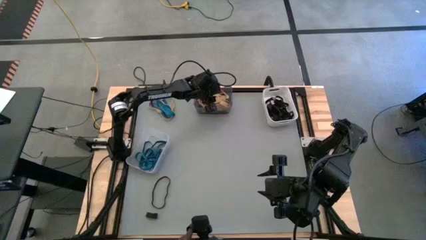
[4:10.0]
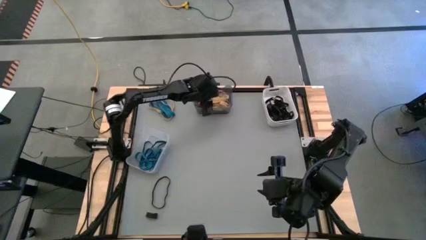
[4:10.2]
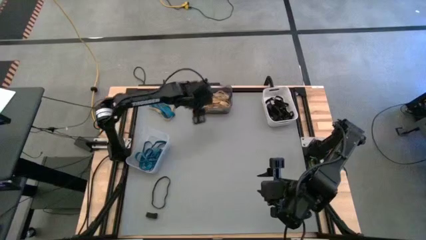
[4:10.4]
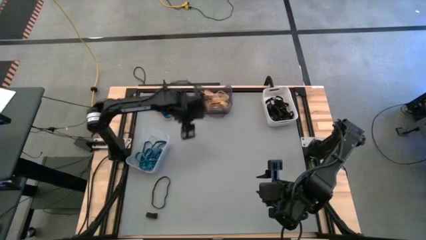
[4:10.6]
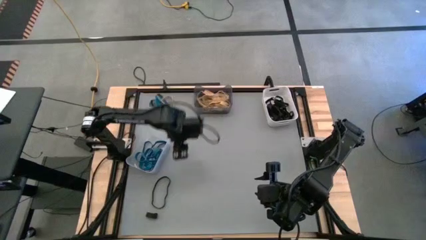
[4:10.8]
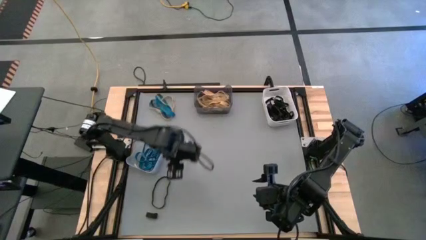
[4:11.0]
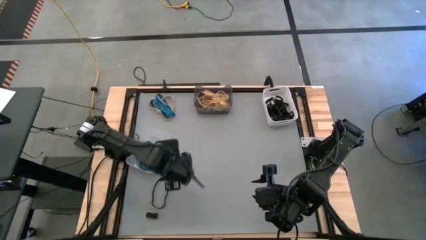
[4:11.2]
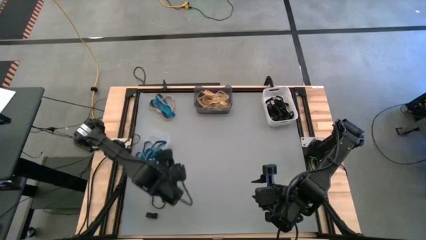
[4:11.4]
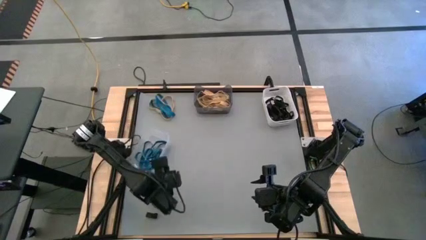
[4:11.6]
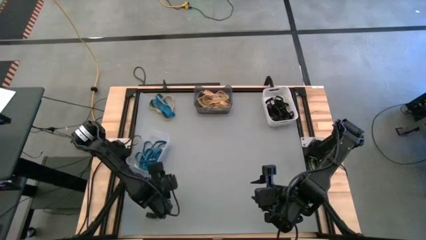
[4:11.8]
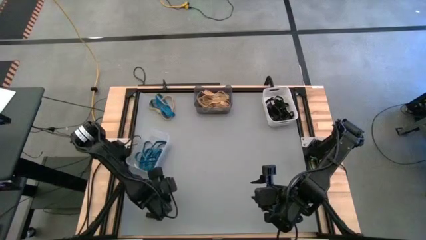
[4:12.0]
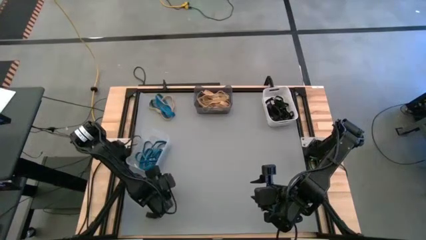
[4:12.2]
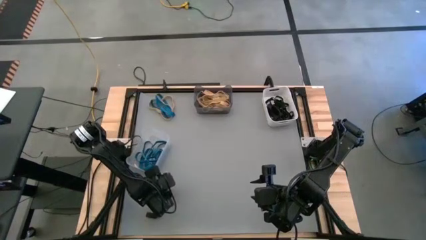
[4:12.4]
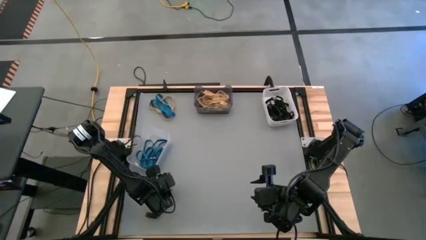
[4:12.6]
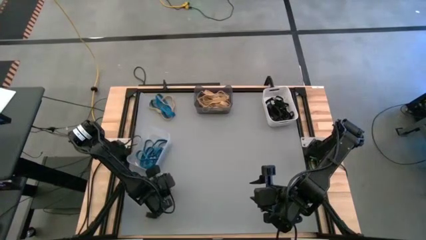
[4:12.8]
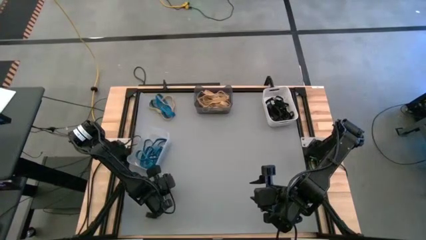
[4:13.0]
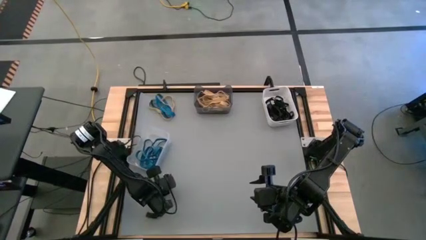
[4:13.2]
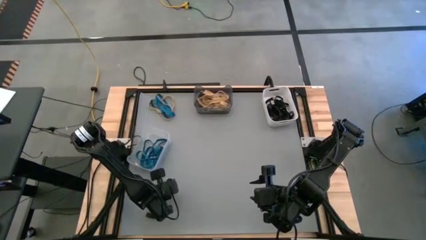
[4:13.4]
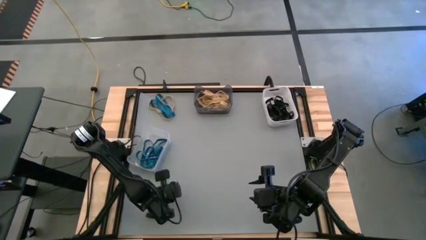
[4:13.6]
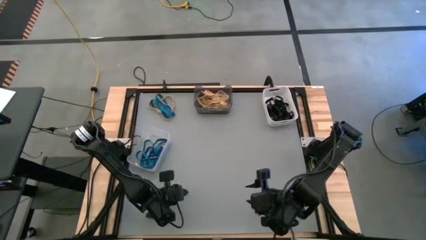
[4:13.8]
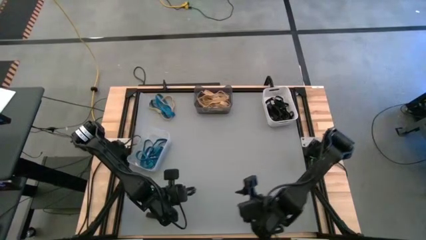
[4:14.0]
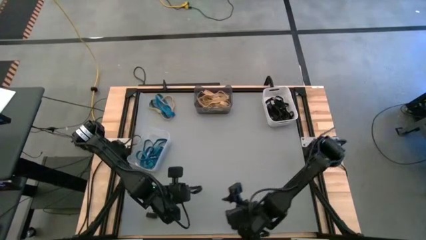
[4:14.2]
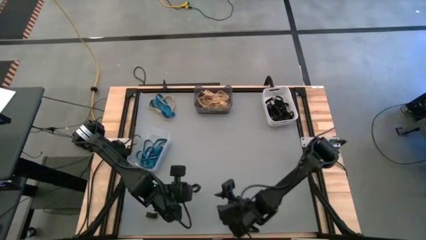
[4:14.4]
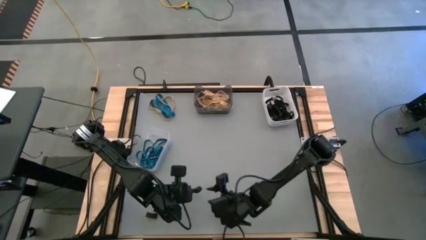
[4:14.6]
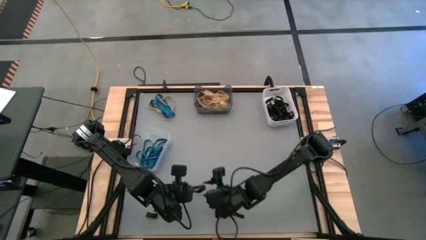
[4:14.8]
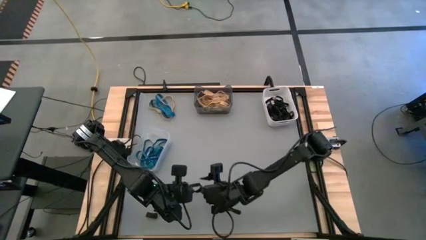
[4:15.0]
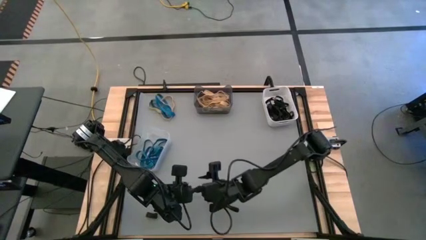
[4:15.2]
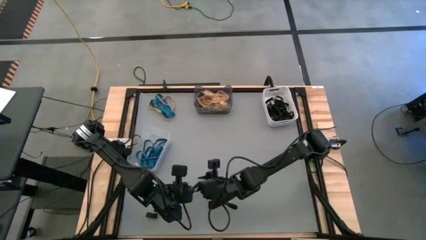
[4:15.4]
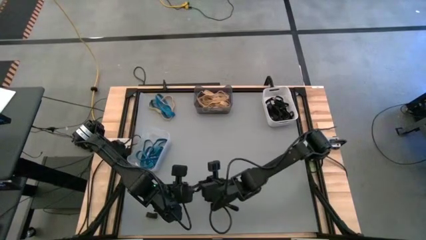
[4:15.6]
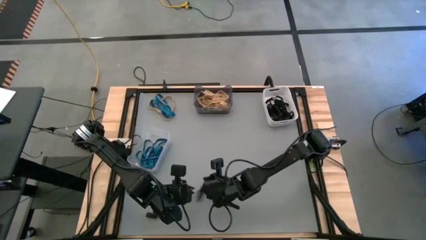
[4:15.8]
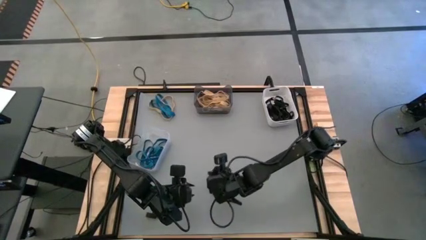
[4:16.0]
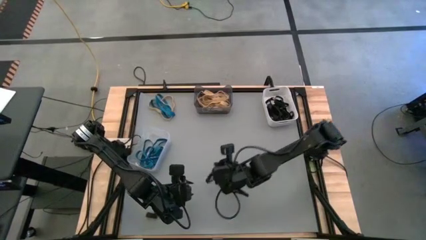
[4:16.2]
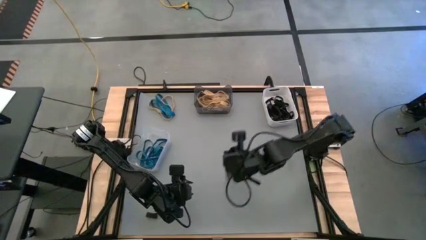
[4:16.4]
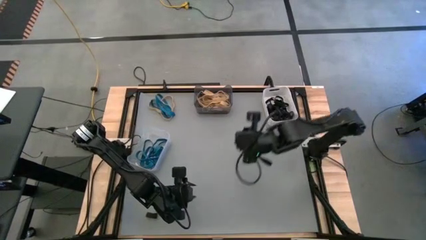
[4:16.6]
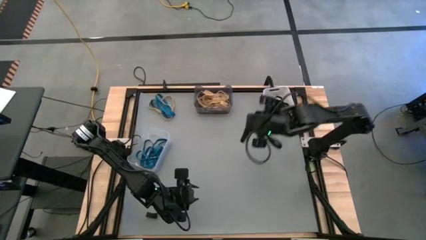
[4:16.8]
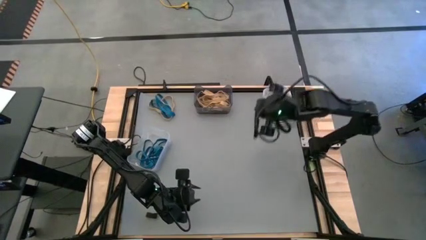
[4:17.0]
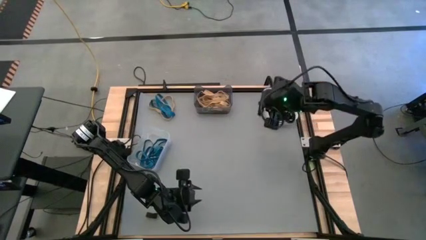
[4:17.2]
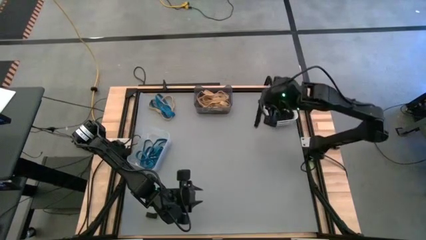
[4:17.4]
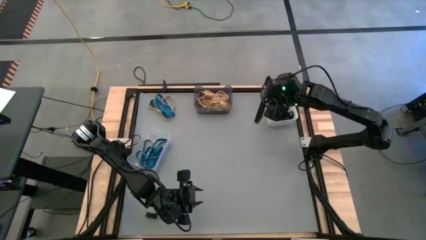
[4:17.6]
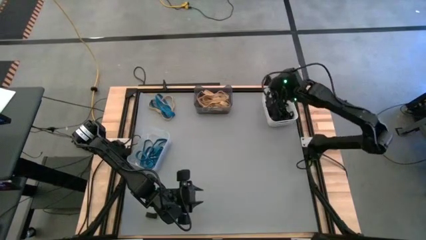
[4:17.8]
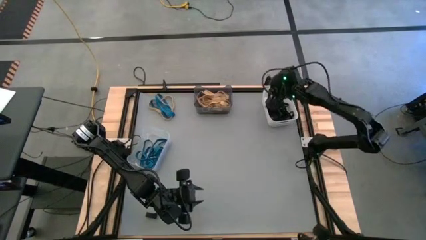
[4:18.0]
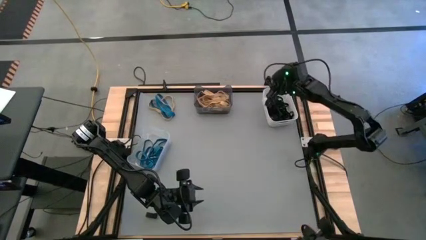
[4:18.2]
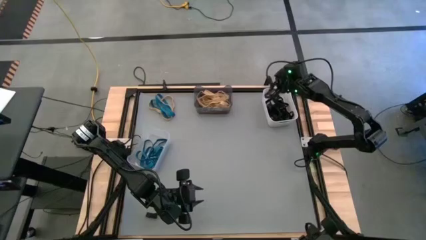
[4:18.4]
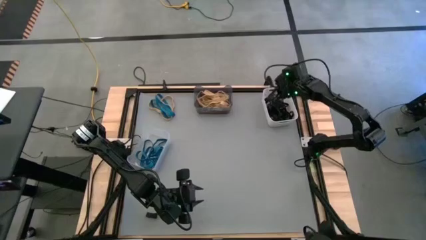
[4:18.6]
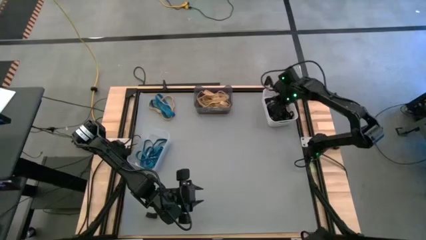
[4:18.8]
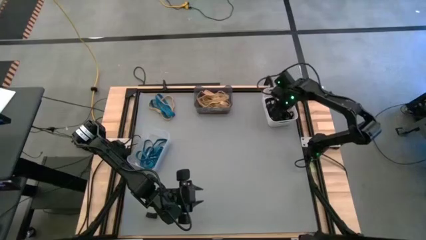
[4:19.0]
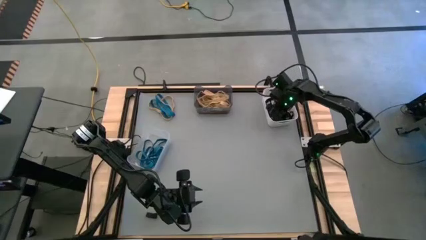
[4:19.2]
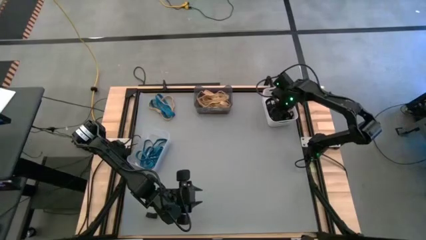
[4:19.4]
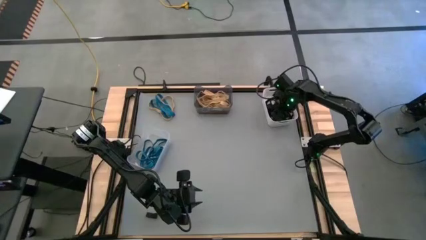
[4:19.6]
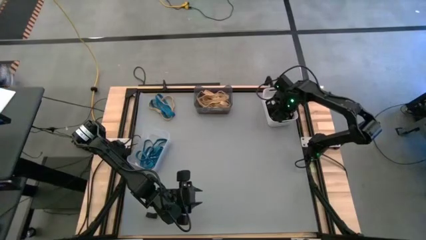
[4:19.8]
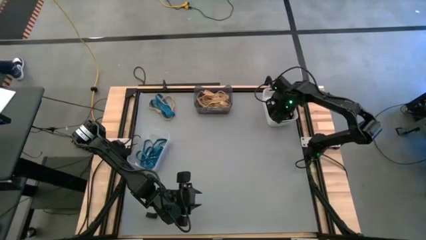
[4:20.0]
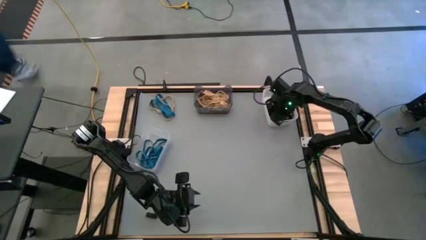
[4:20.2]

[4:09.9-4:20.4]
Task: Sort rubber bands into baskets
Put the black rubber band into the white bin

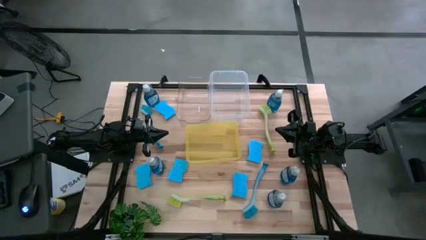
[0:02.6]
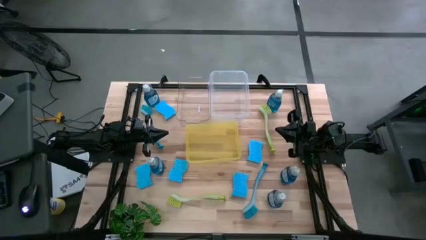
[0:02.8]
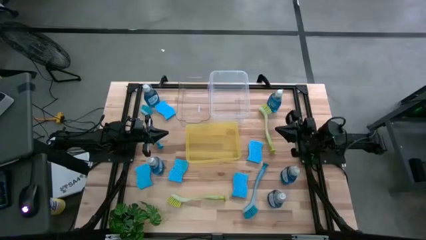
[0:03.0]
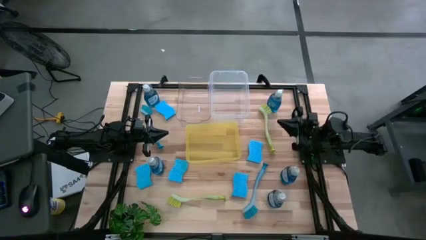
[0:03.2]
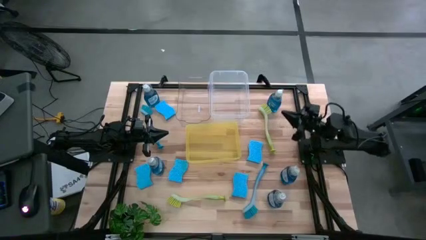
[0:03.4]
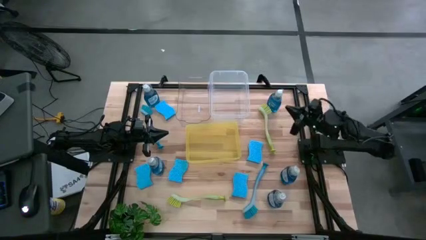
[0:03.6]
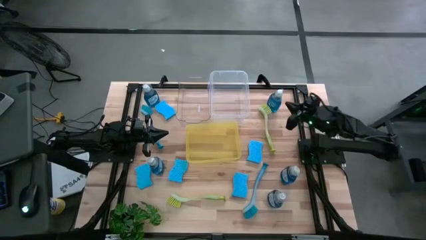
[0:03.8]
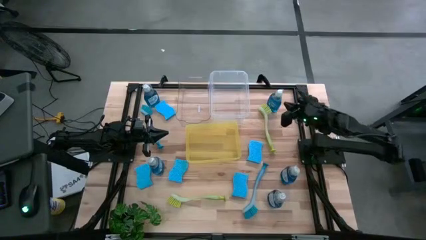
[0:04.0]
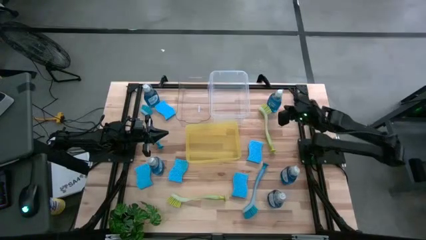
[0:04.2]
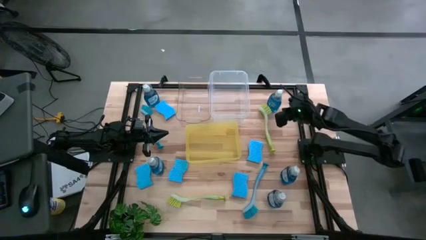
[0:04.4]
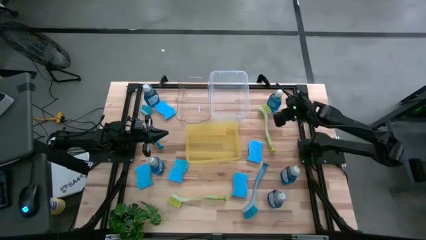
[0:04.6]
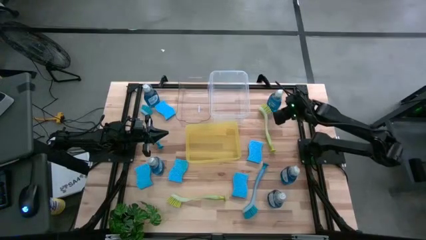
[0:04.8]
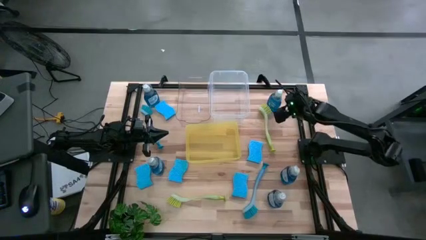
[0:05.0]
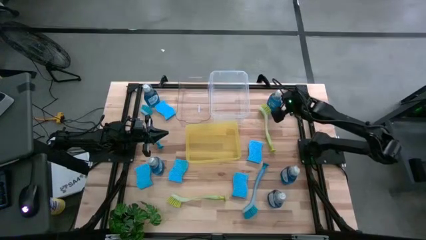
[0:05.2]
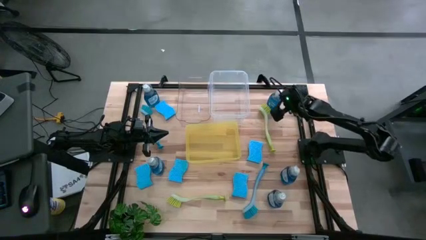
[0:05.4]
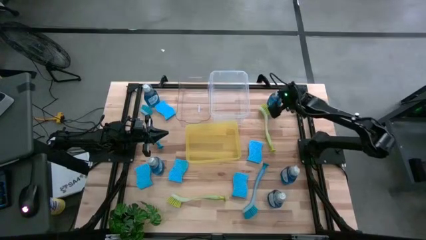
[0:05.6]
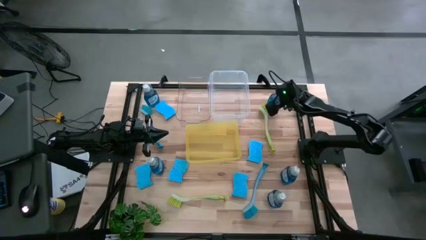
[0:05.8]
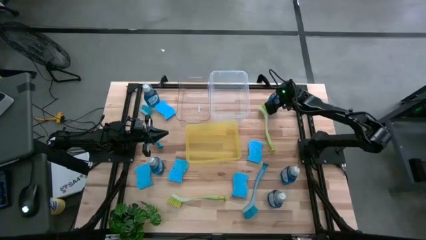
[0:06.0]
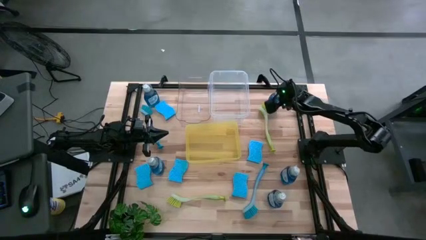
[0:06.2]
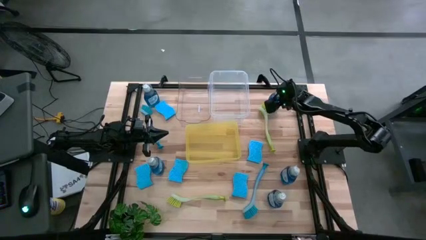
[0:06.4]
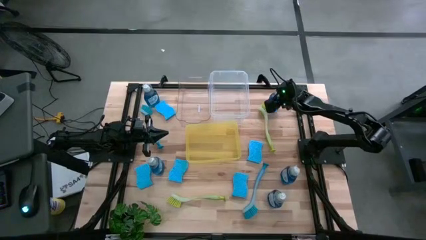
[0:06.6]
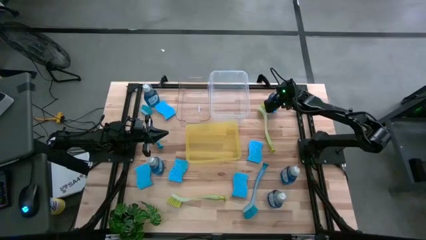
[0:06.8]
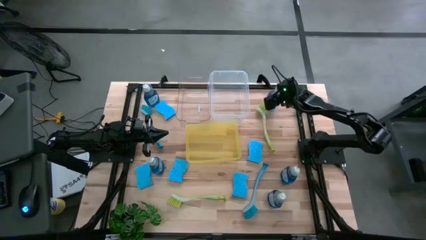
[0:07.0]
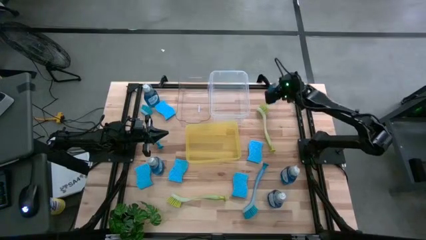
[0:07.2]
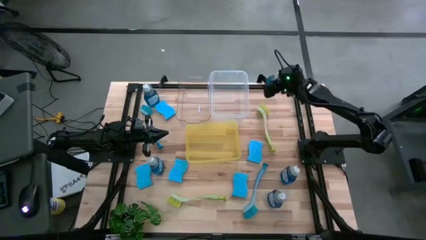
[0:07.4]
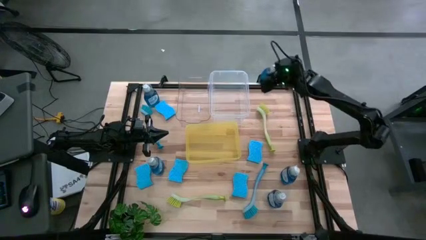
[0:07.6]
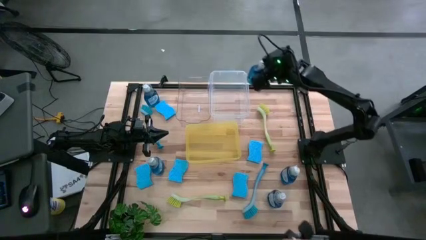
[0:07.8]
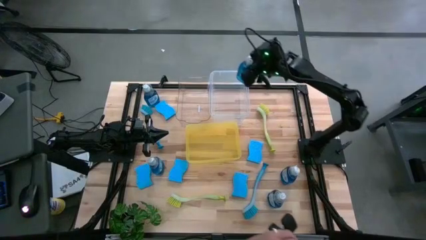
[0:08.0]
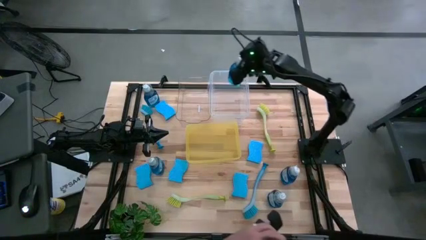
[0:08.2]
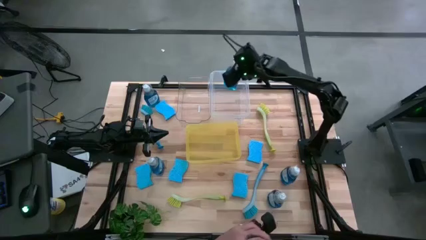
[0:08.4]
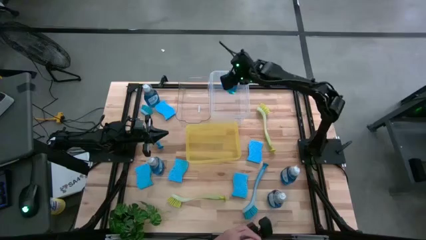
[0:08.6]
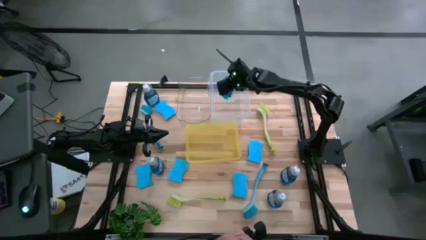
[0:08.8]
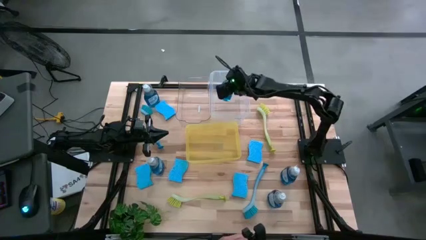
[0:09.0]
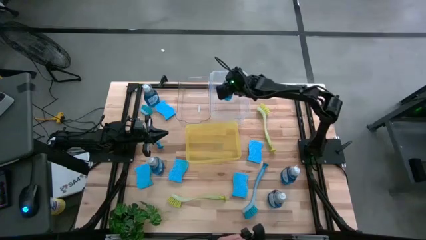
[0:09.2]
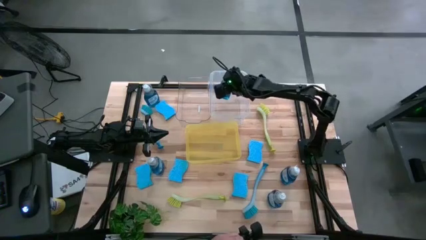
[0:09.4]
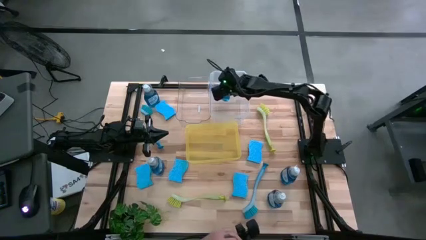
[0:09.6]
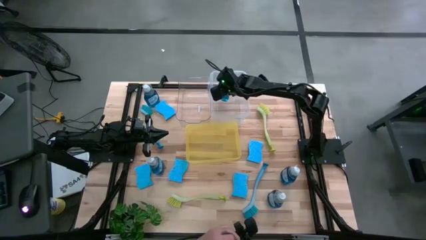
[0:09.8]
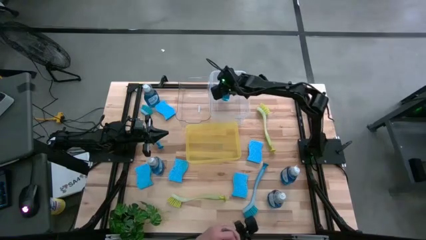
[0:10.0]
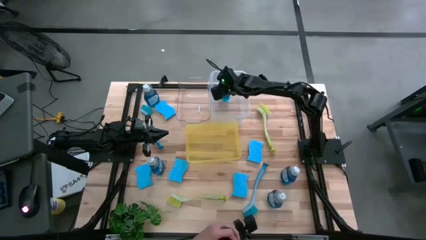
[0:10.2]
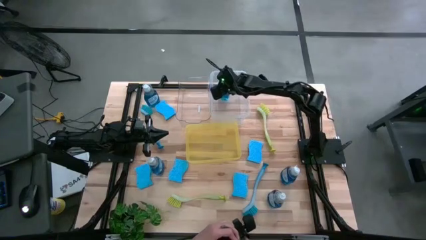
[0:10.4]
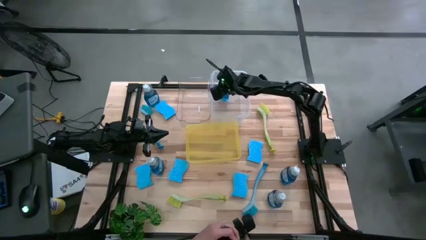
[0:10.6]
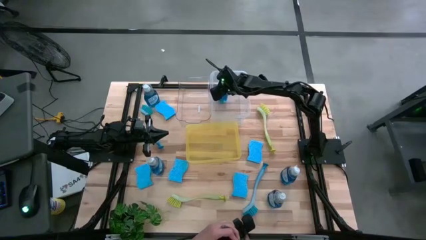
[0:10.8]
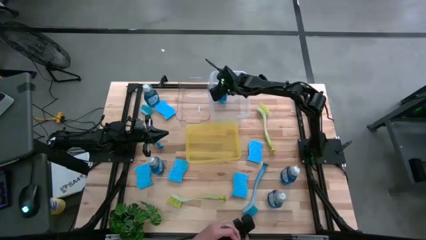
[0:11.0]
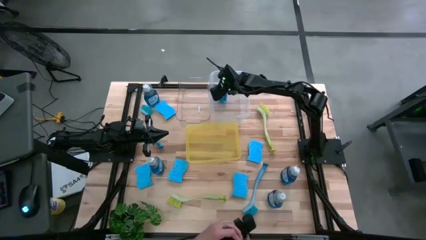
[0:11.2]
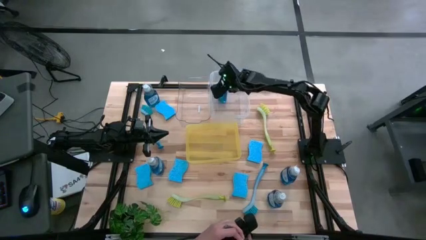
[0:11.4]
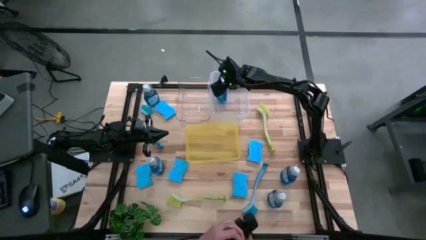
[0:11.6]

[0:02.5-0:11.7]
Task: Pick & Place Kitchen Sink Supplies
Put the blue dishwasher liquid into the white bin
